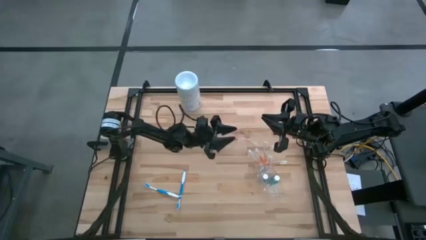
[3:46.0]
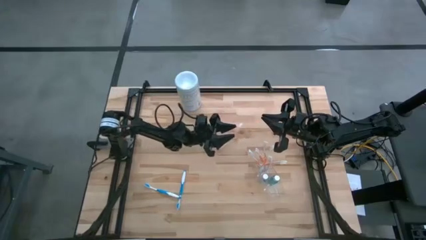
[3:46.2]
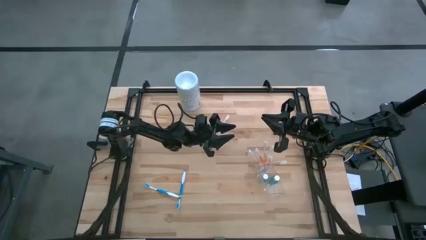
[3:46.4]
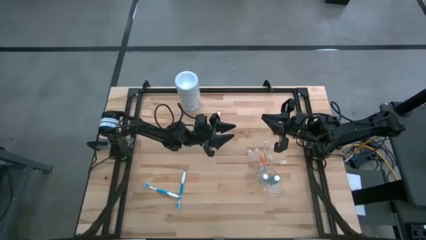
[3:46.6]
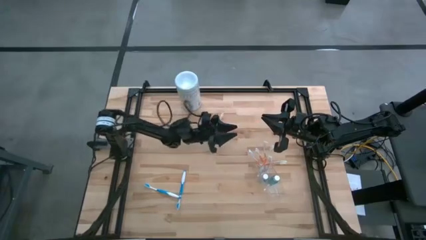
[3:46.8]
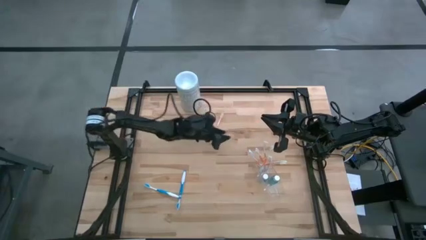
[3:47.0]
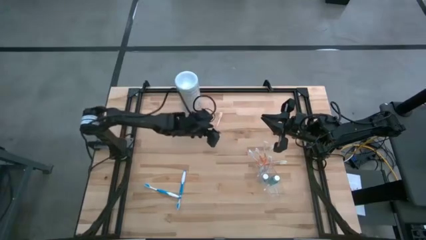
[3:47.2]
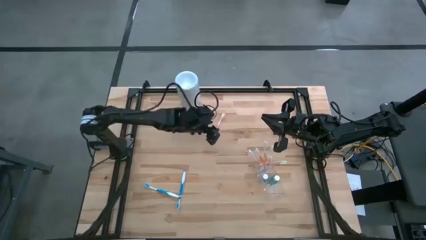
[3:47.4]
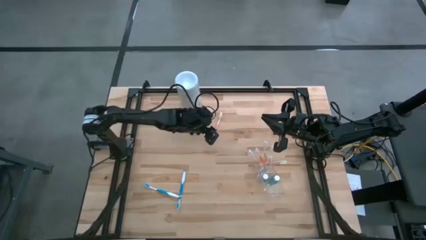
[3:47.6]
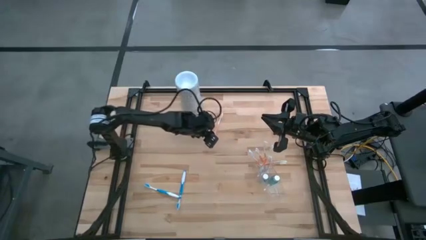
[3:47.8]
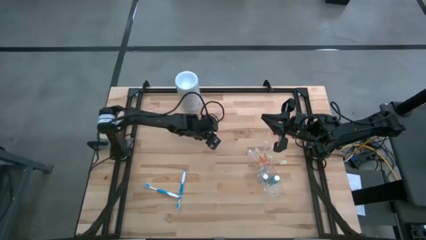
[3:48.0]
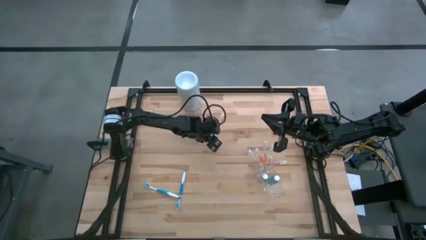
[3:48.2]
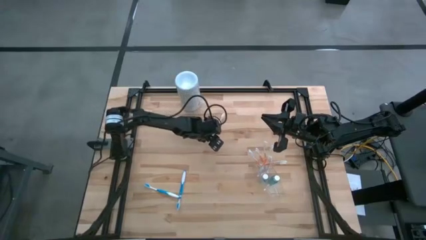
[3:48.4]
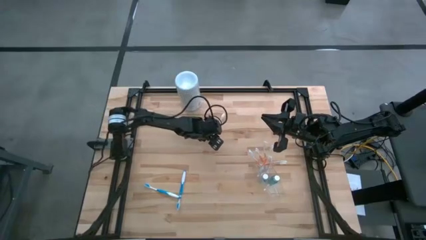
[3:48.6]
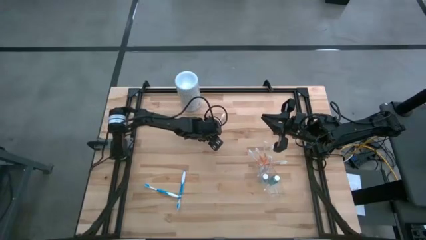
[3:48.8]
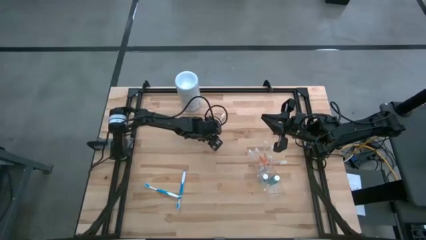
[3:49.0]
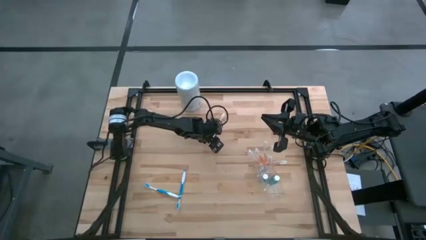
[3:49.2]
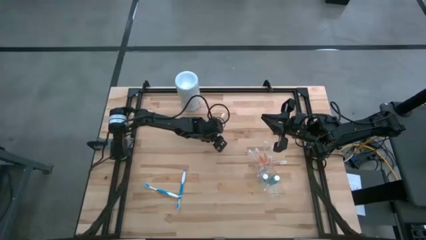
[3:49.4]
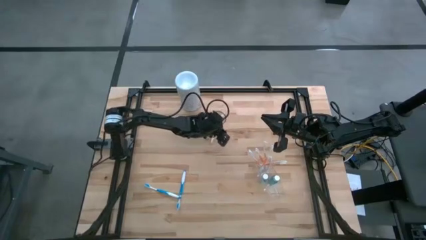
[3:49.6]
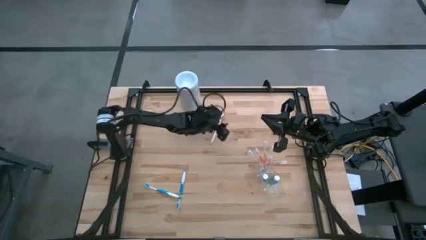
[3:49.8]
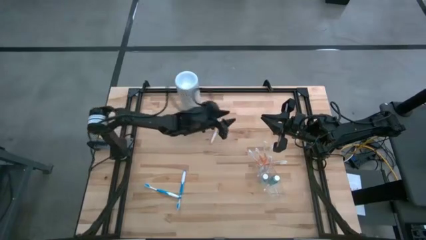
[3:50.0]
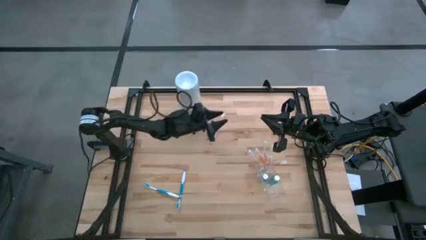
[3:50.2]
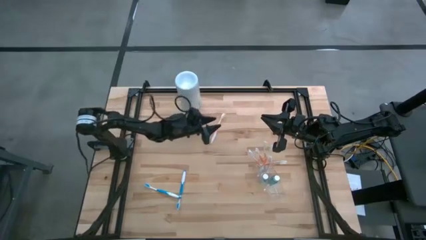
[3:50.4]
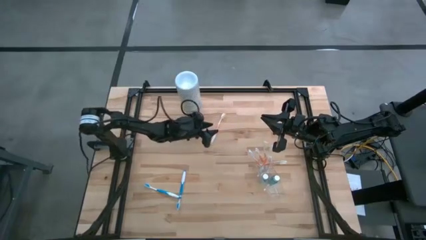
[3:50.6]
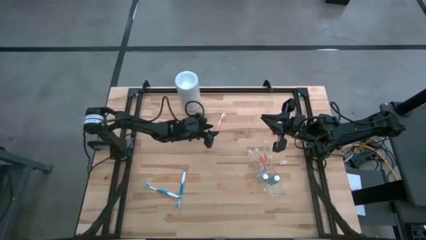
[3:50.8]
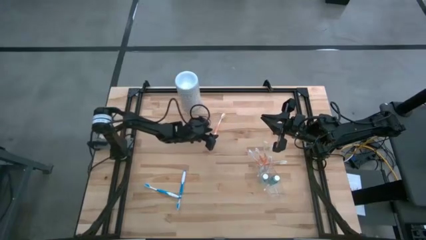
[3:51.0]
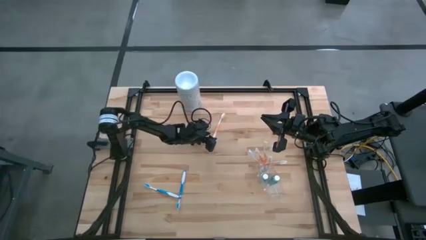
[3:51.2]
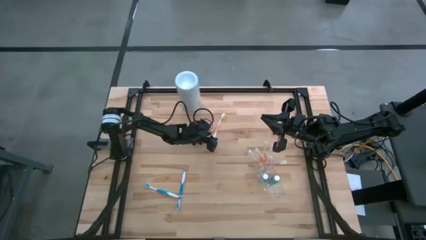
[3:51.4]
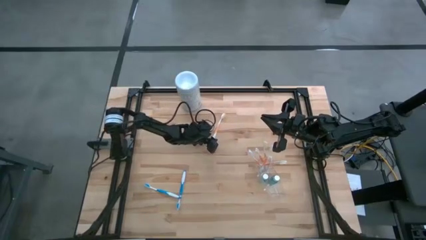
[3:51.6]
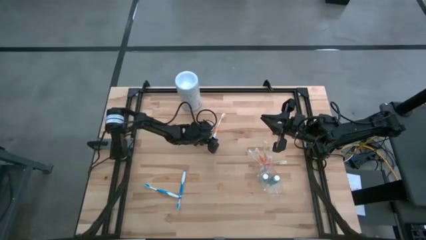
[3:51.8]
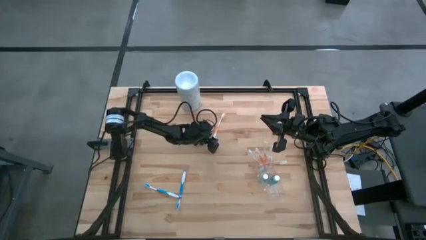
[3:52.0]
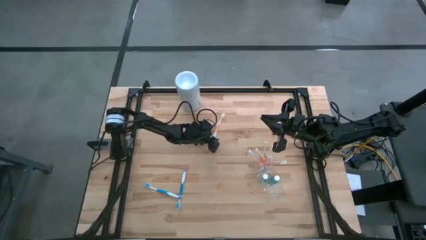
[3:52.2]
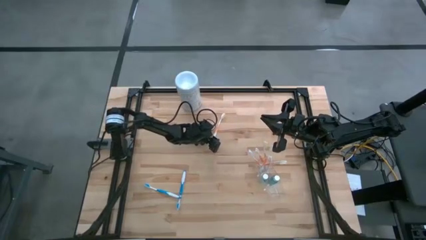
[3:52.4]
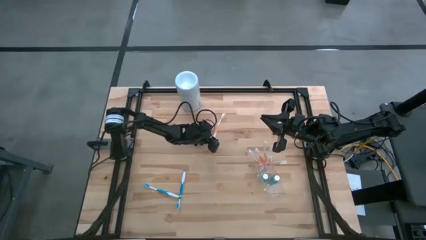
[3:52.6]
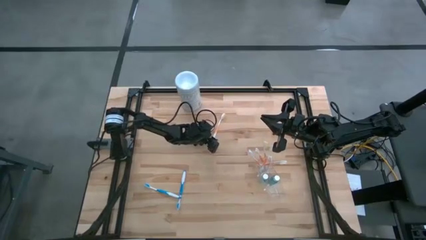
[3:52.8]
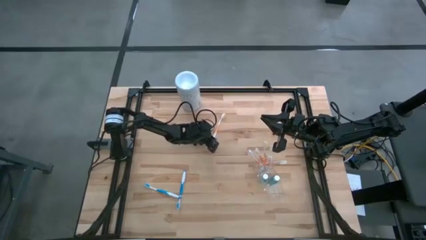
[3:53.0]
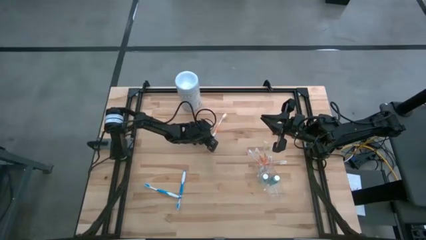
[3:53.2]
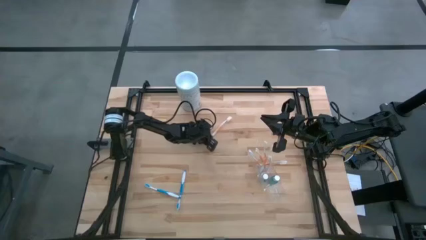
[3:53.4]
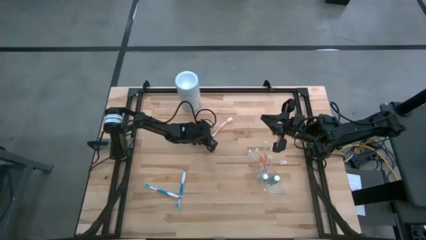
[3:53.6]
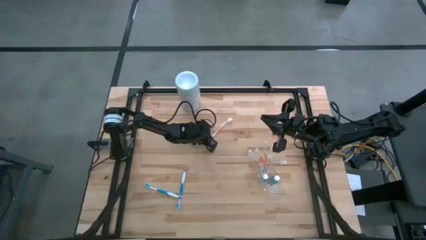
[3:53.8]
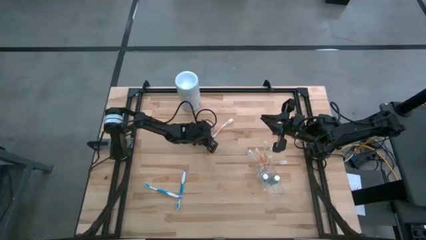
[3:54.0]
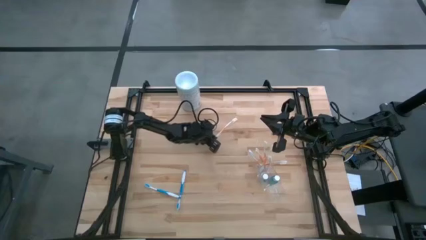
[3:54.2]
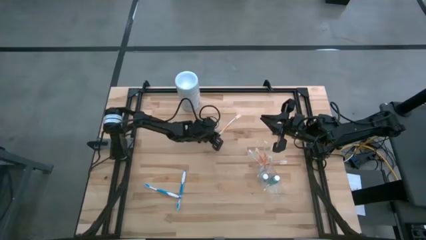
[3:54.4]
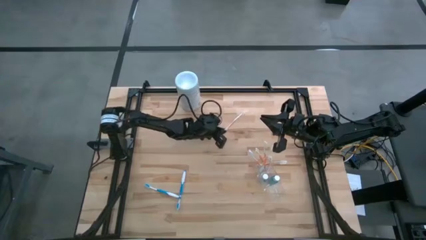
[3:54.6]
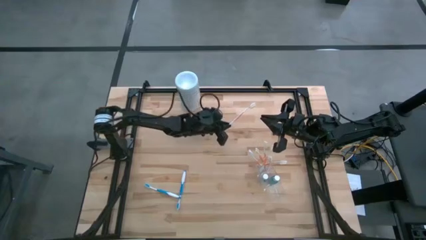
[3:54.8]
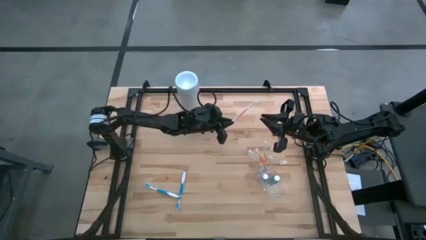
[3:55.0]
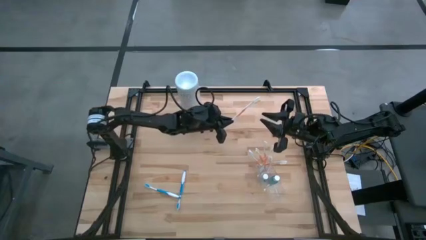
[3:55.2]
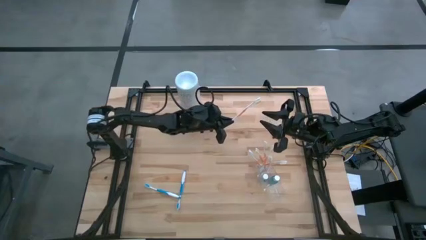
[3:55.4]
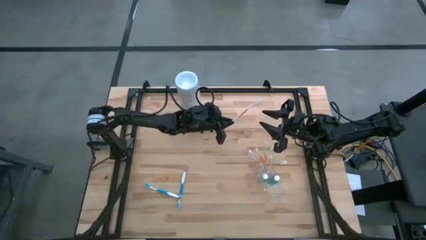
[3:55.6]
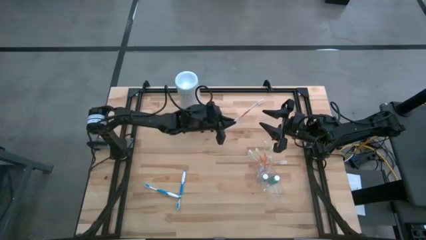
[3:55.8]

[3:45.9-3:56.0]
Task: Pick & Place toothbrushing station
Put the orange toothbrush into the top section of the transparent organizer

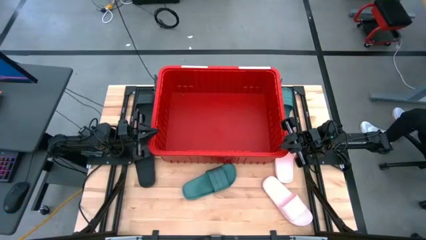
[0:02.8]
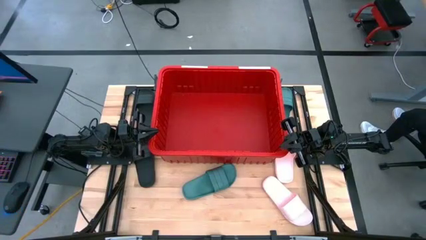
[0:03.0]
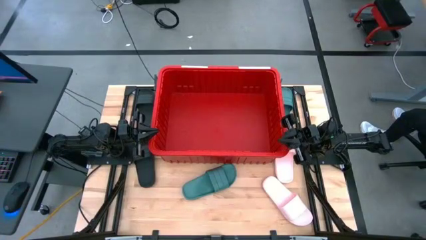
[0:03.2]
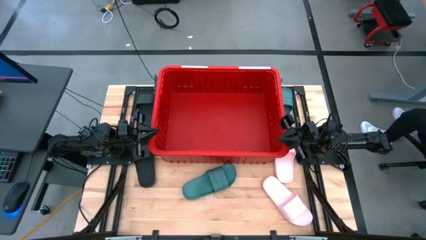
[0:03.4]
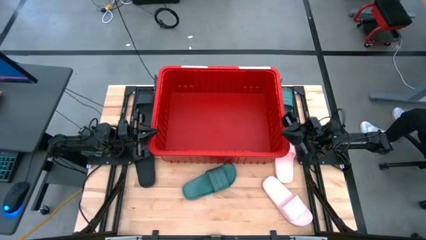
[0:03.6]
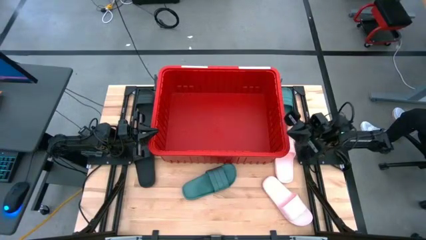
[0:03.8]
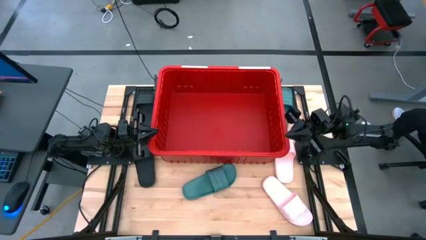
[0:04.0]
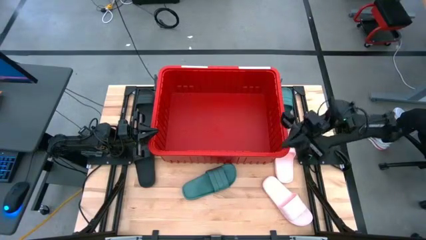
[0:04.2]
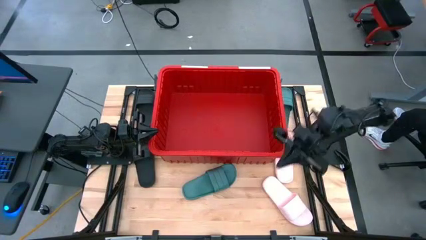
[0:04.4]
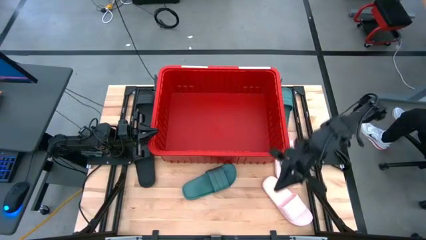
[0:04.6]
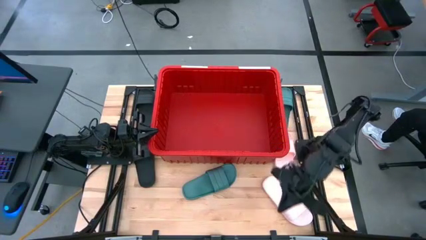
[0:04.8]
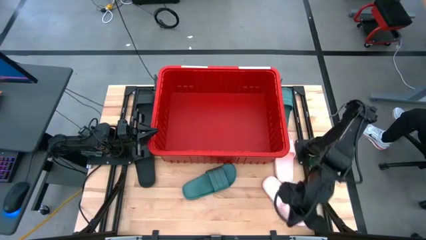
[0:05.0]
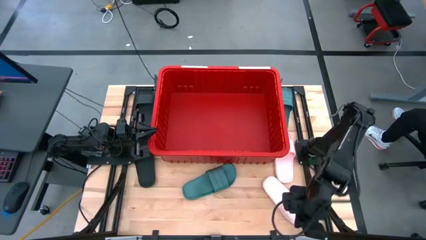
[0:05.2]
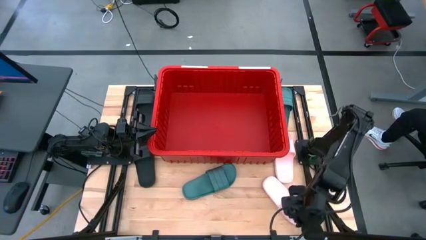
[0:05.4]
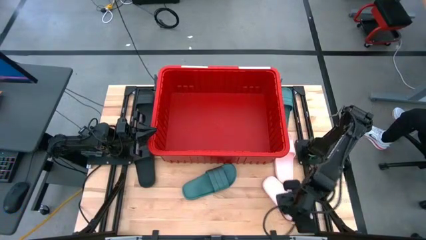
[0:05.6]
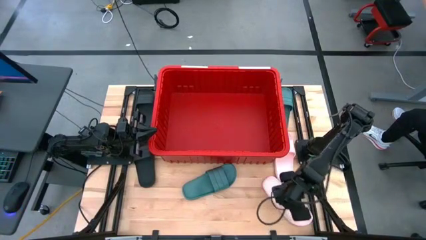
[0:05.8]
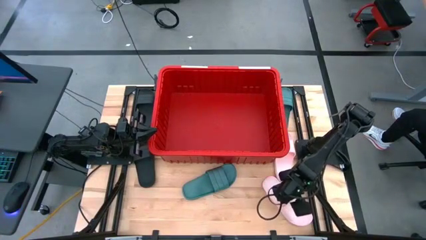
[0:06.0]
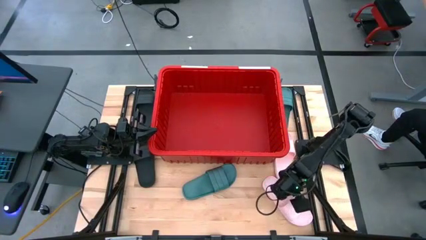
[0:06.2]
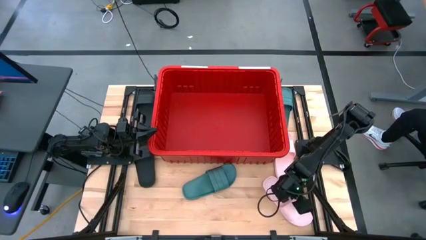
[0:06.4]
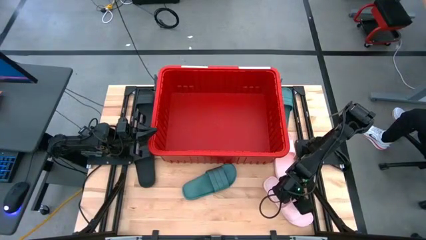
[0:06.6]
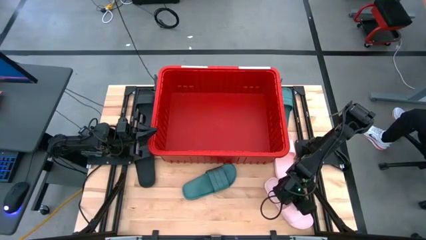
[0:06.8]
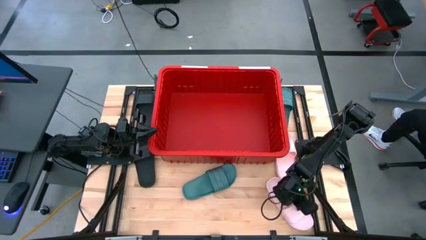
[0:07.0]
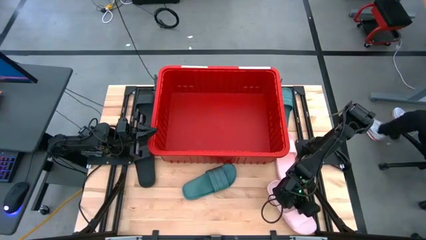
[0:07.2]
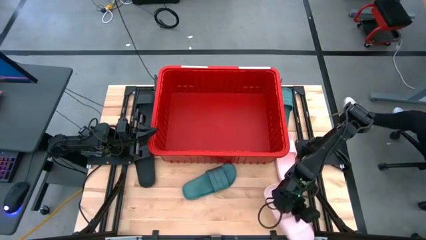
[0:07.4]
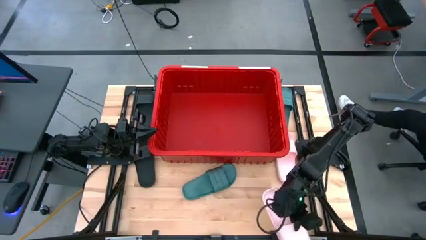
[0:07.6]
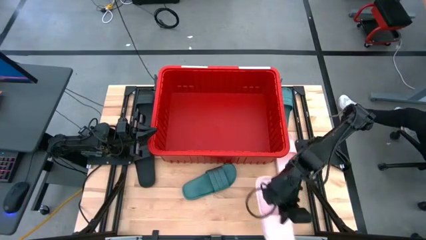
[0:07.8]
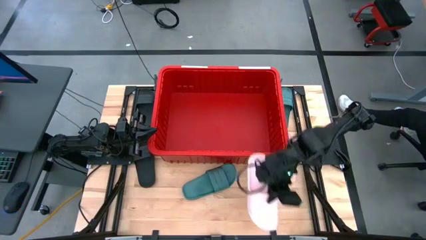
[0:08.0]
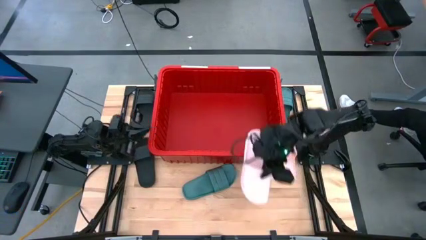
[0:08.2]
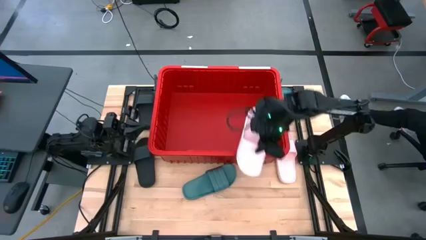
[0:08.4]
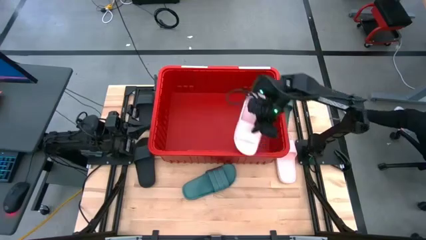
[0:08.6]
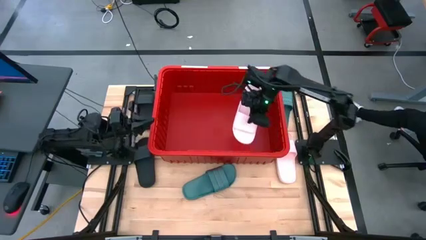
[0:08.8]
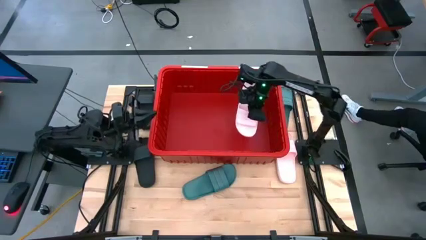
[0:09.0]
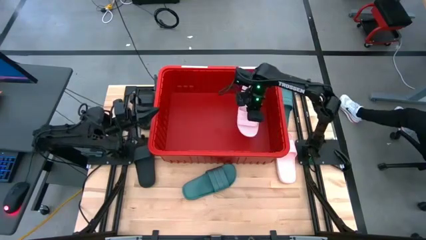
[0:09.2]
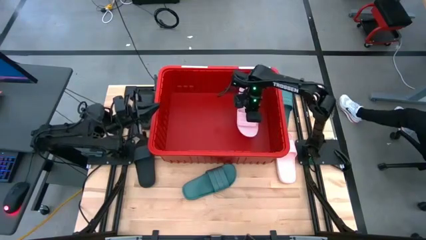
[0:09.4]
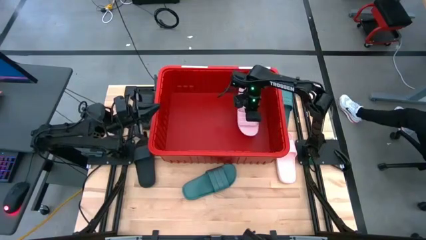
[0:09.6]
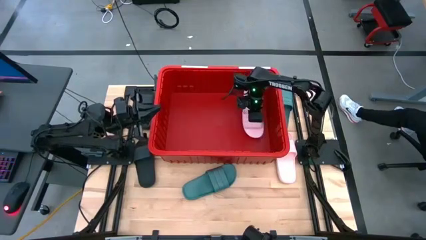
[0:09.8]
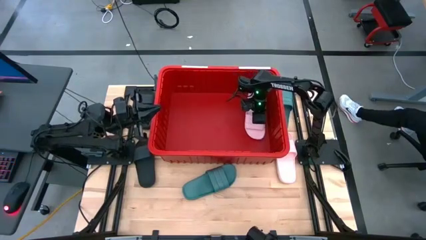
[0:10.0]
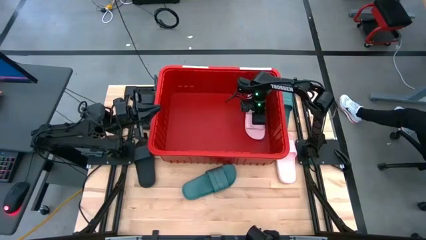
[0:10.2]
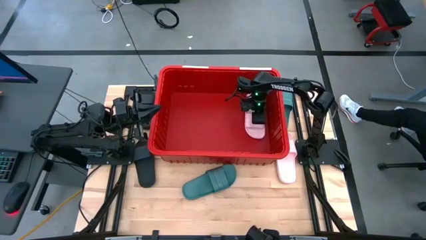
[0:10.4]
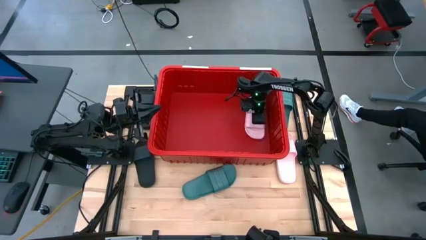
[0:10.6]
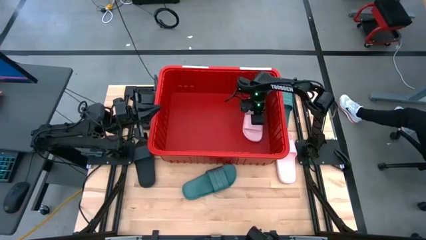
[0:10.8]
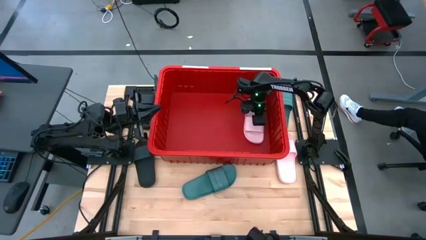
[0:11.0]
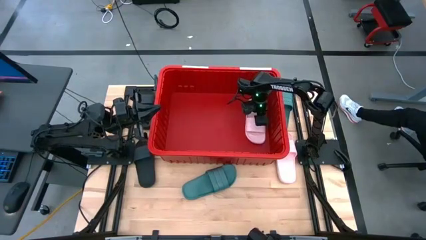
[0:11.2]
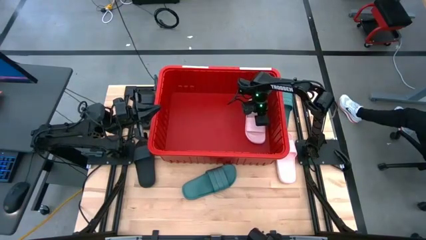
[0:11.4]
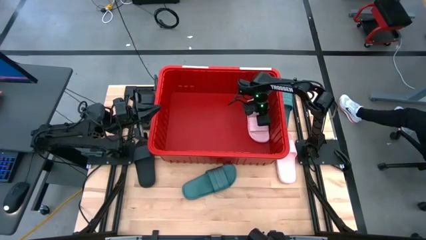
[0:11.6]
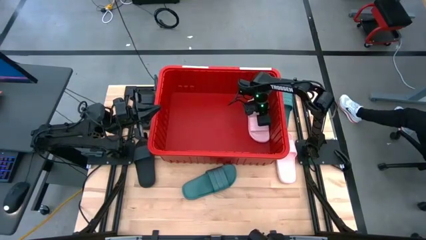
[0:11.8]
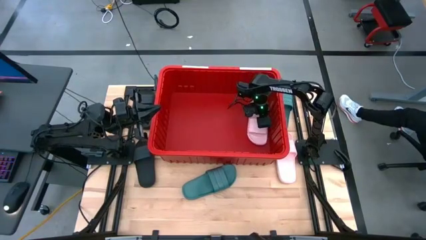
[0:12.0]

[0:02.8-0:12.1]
Task: Pick and place slides into bin
Put the bottom pink slide in the red bin
